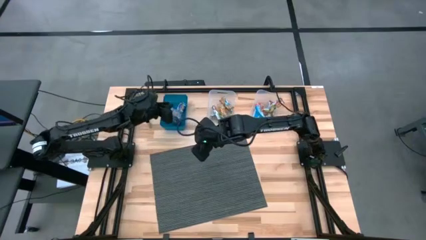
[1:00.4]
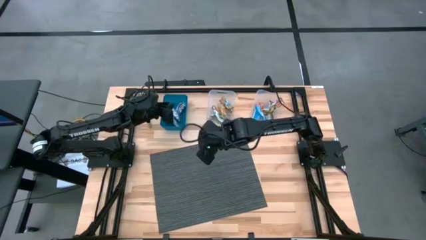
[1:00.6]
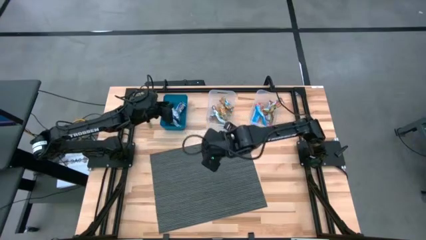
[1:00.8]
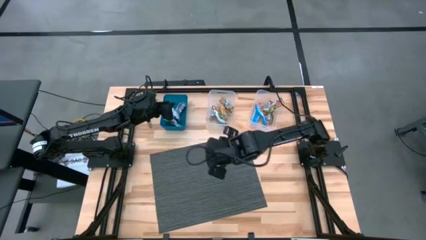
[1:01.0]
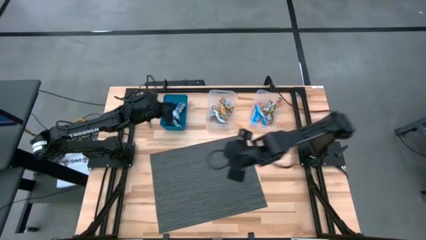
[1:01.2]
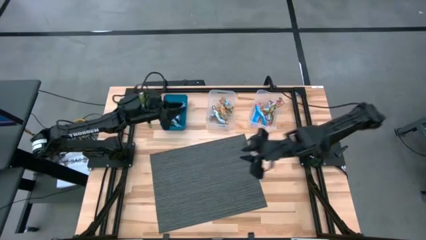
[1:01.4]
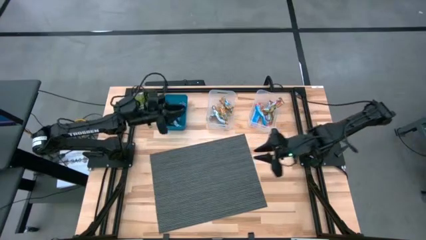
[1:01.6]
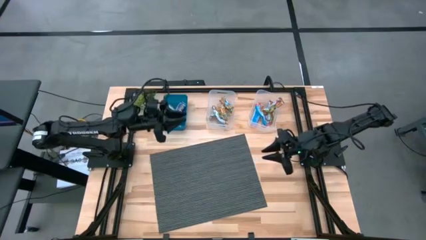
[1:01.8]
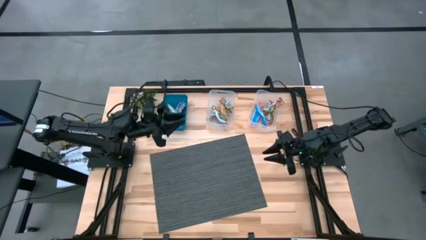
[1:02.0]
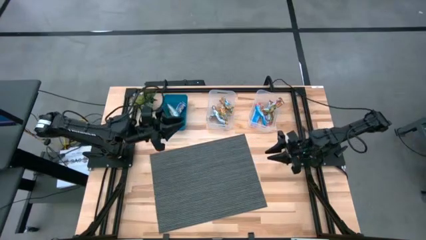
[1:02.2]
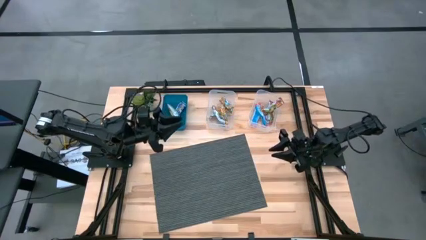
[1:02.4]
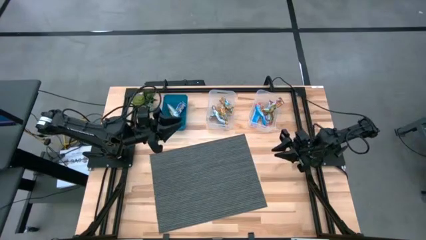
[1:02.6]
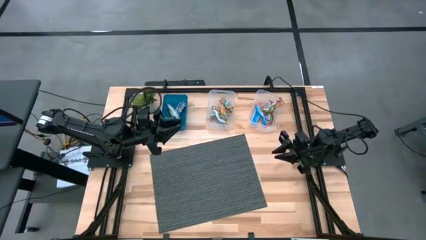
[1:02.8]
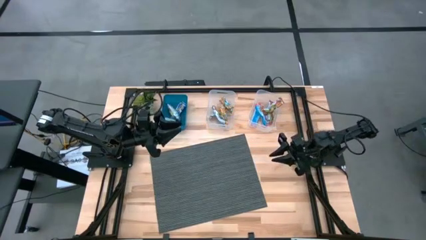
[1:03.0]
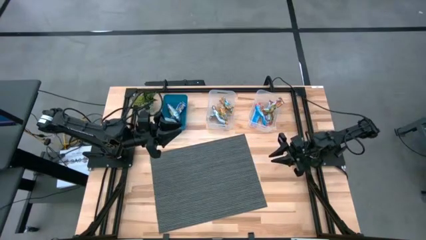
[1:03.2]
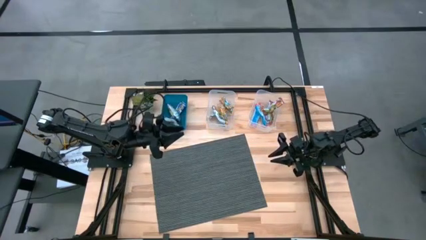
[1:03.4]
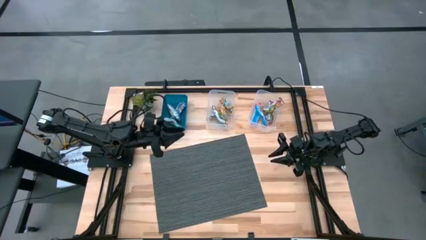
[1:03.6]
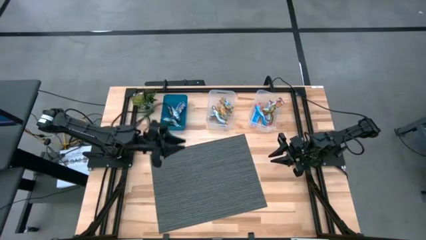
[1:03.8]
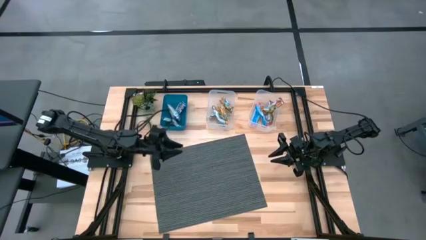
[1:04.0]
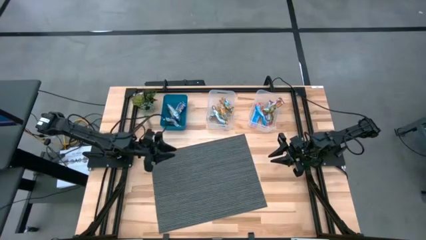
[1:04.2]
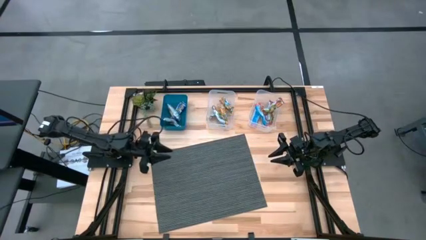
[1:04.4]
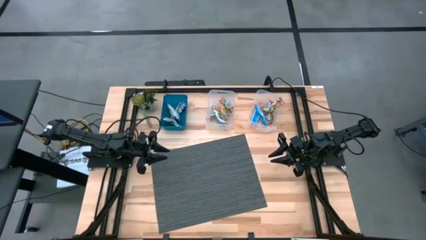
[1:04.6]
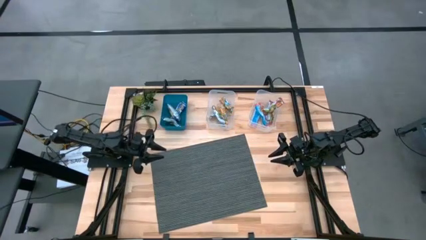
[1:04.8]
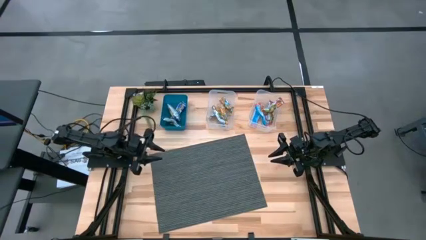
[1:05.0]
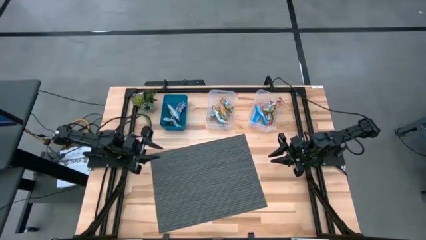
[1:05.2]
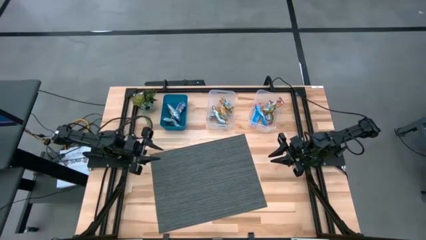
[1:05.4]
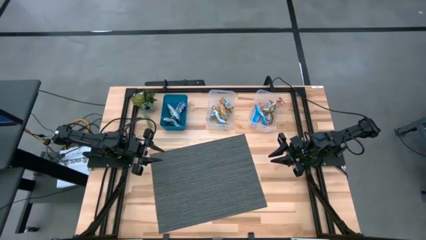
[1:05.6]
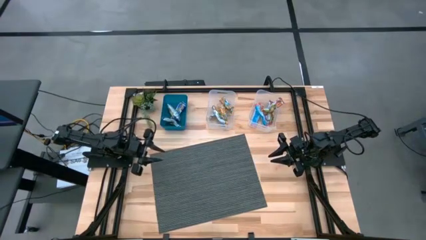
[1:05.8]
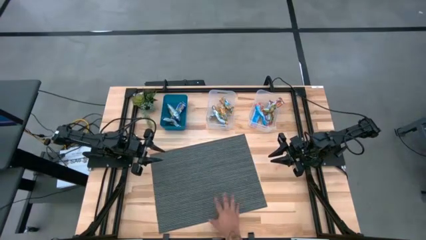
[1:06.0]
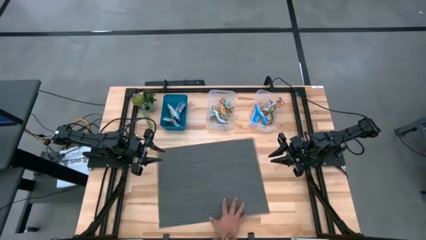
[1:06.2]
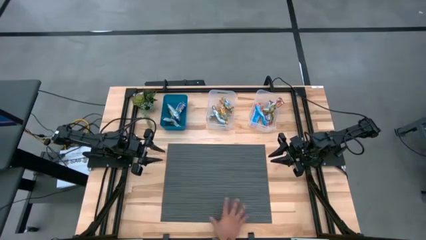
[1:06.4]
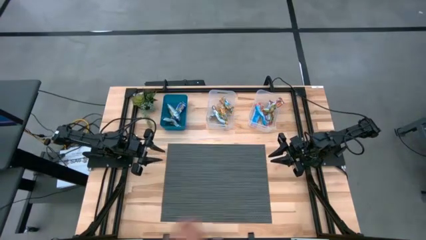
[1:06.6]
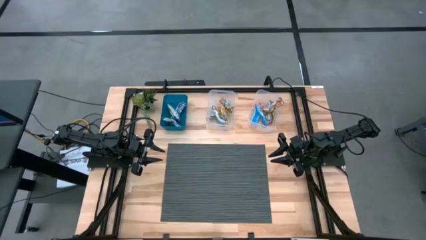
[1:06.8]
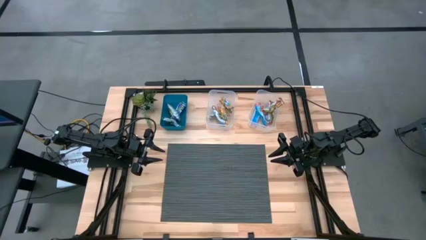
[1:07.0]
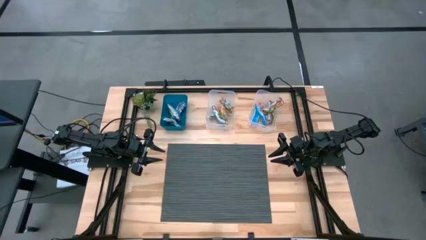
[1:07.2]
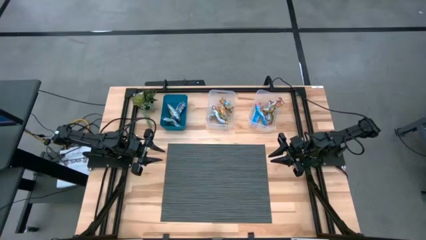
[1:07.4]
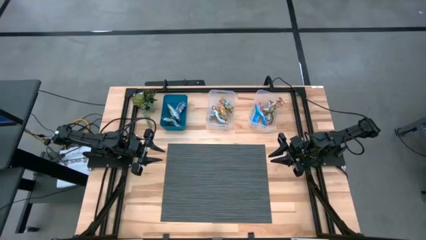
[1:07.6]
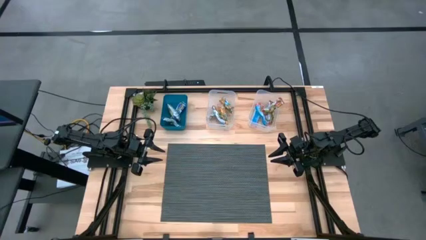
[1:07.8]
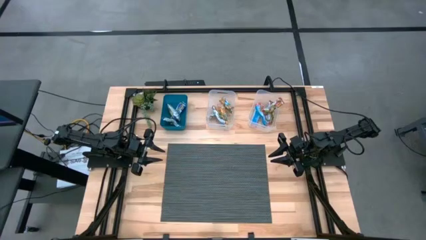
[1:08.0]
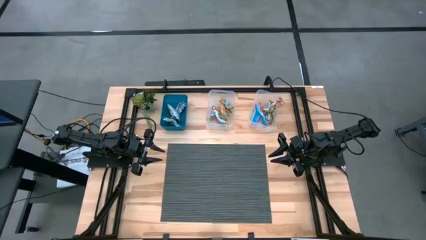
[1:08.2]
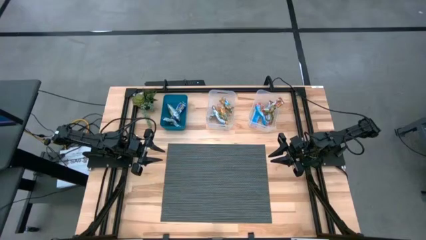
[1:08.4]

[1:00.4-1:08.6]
Task: Pick and place Granola Bars by type
Return to Home Position

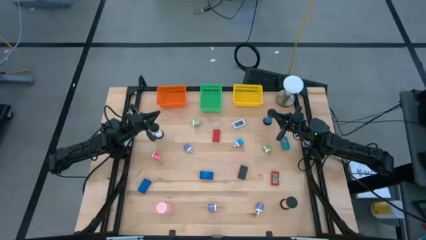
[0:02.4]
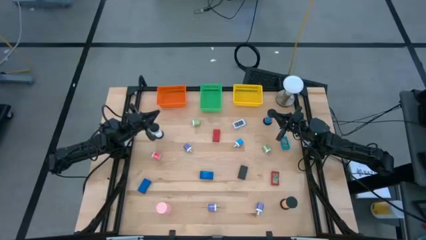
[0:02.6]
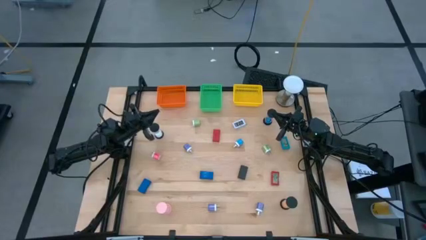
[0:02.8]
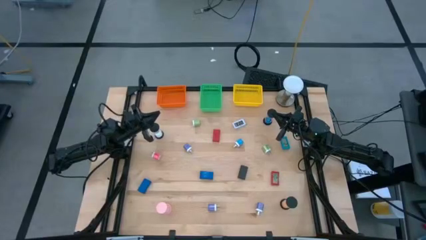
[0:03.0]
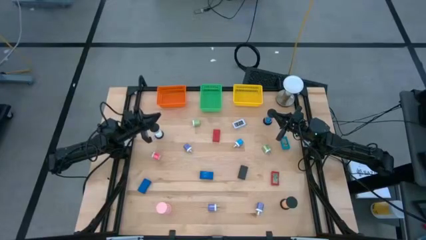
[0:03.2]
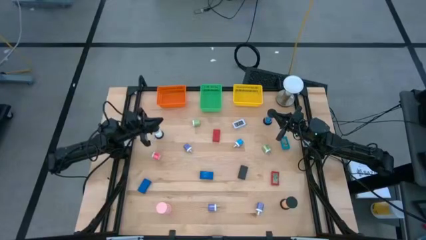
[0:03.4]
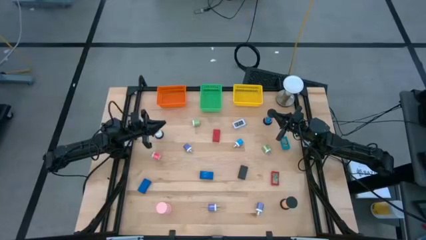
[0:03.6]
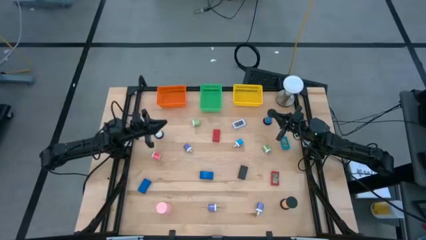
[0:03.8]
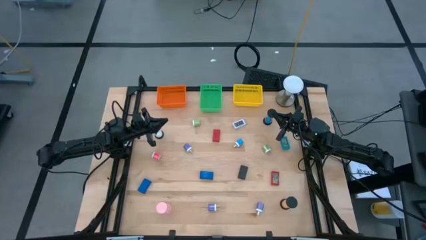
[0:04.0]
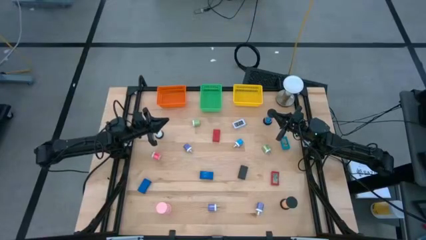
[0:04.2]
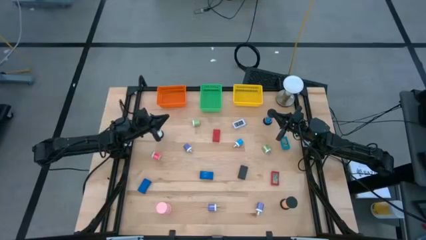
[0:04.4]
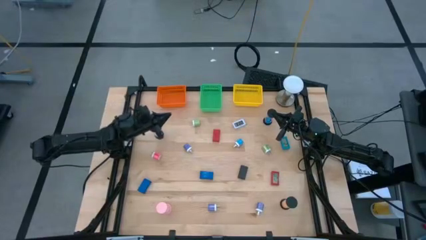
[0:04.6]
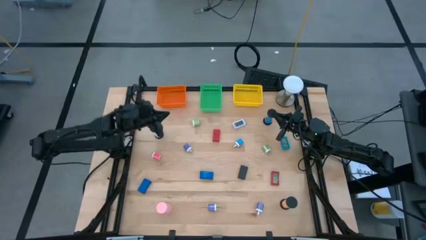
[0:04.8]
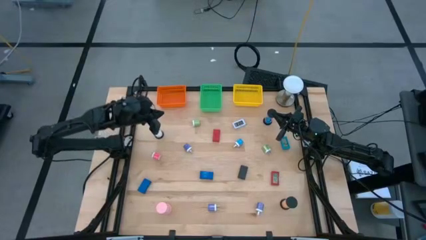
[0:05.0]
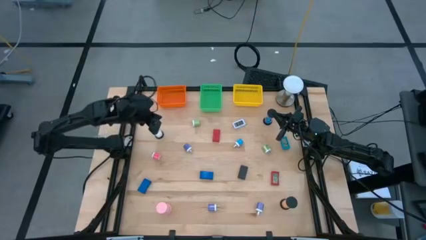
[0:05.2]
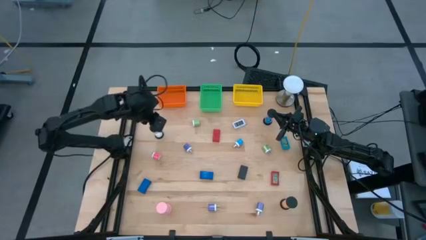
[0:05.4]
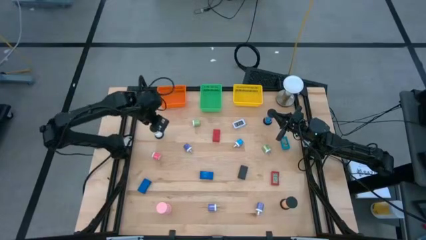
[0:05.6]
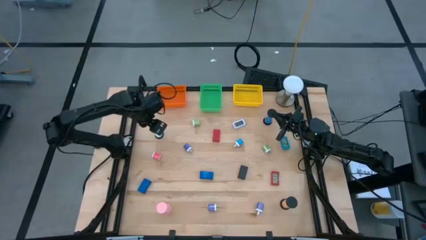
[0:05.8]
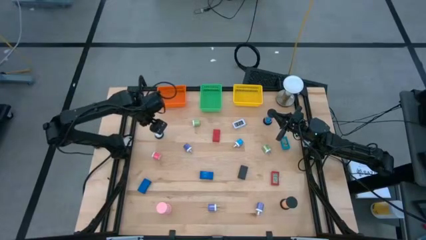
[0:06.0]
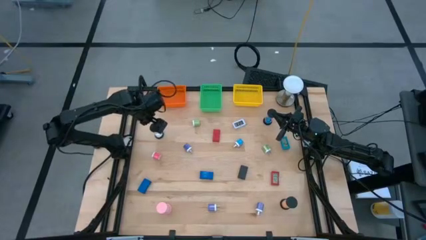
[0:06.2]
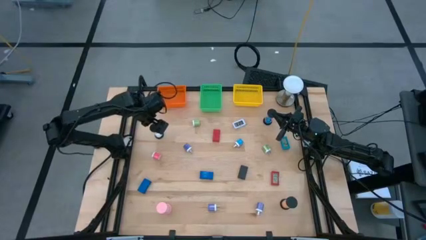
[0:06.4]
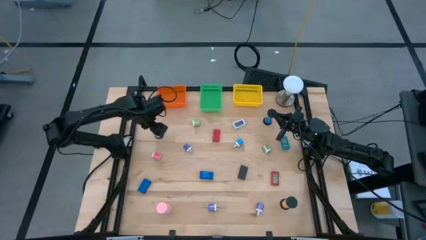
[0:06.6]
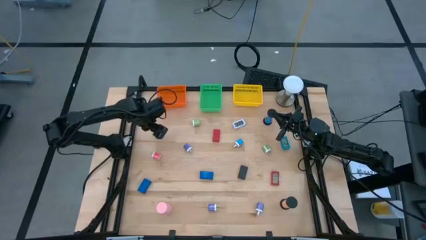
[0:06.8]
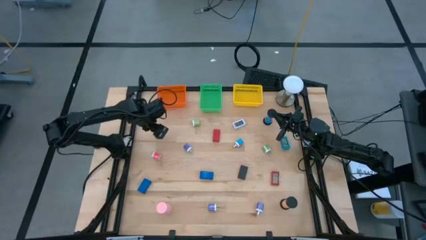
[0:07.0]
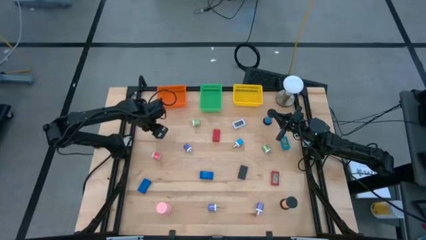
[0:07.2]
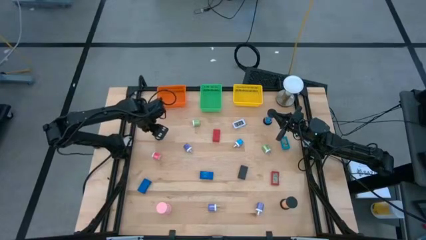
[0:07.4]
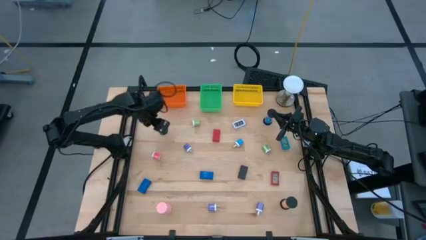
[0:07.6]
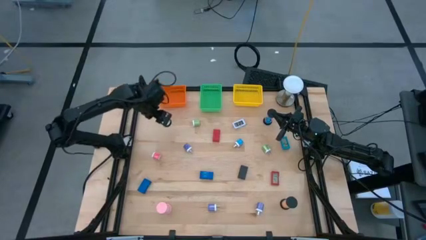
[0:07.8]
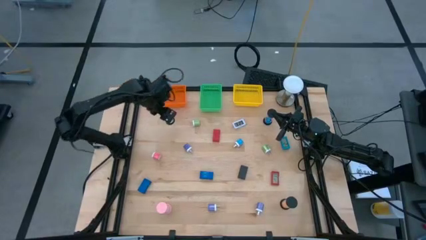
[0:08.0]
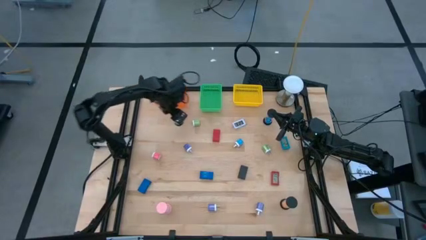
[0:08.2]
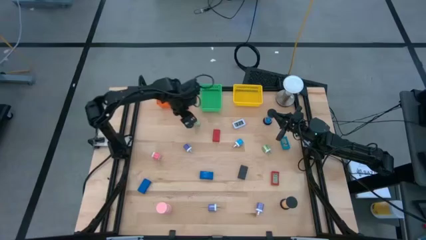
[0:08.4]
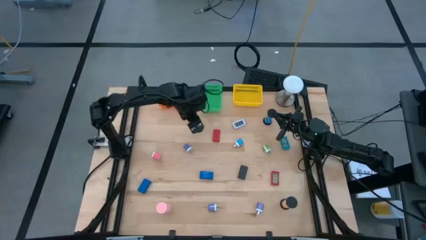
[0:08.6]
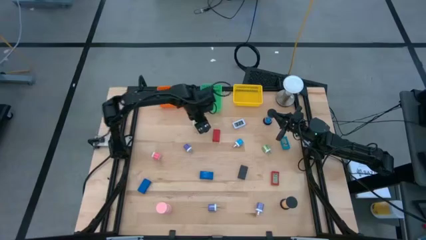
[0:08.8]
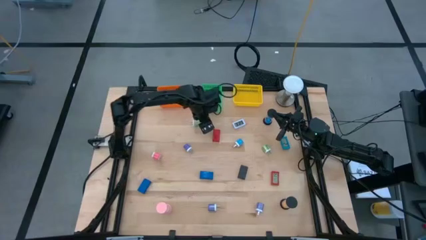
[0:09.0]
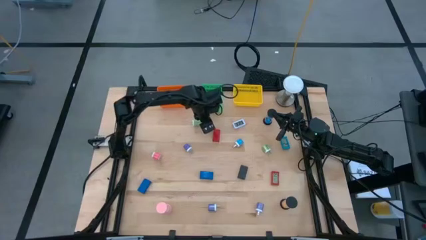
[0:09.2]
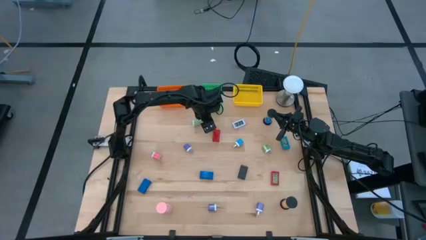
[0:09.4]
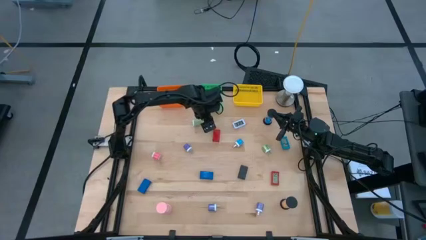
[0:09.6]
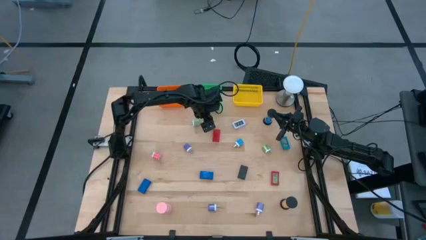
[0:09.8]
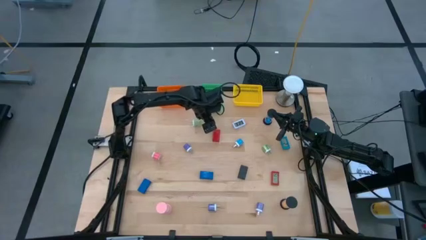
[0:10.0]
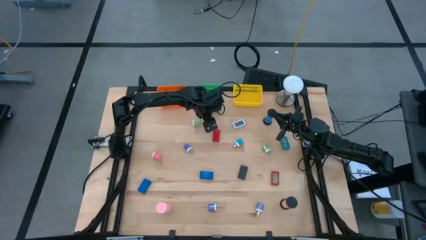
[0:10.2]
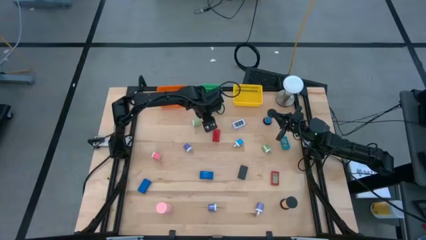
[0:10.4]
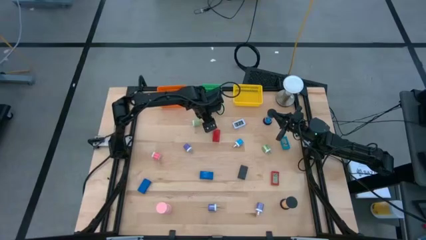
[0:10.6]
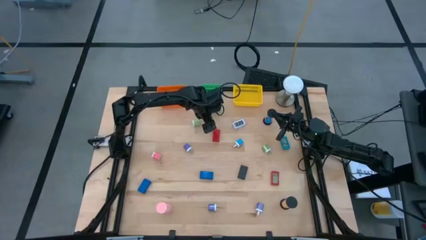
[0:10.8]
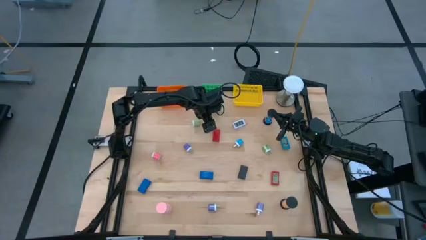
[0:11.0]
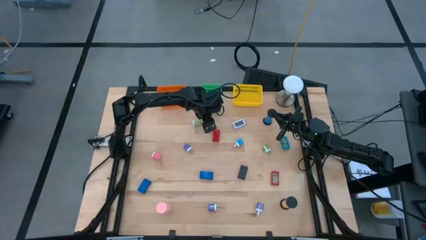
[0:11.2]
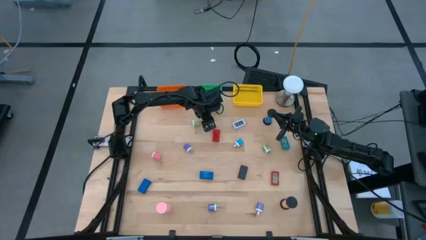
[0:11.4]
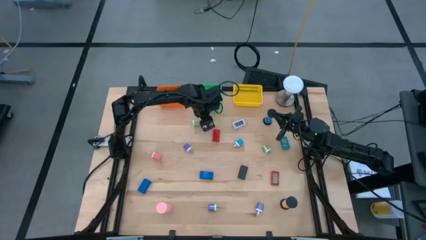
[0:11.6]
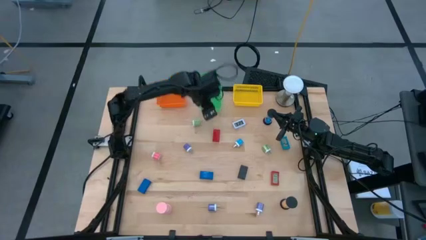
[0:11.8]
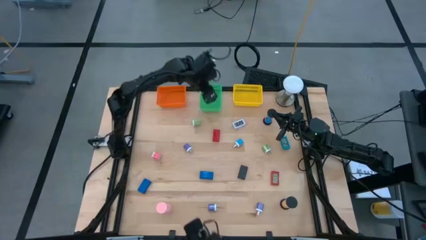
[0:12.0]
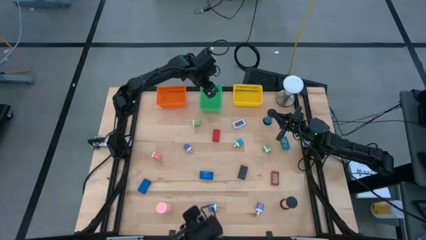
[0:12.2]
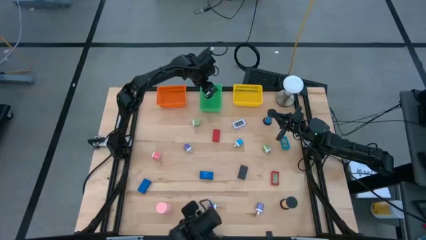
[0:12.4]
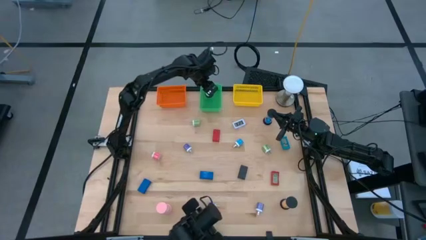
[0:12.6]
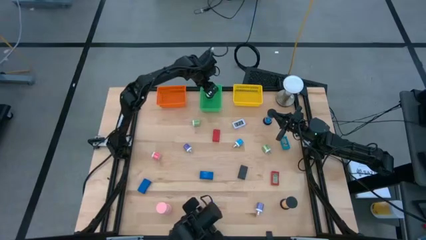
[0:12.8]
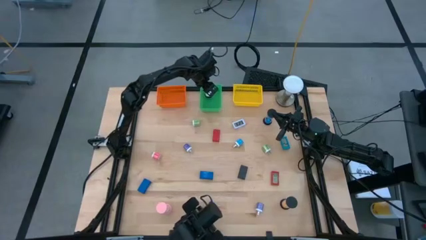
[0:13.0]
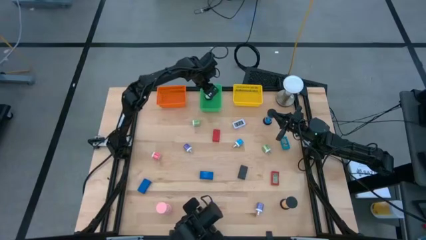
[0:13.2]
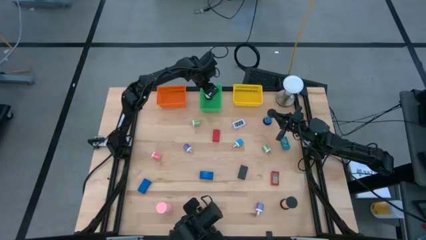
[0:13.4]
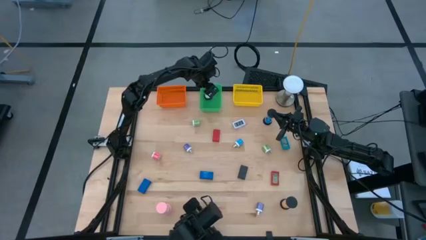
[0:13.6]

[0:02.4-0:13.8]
Task: Pick & Place Office items
Put the white hourglass into the green bin
